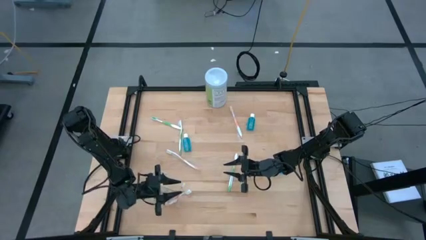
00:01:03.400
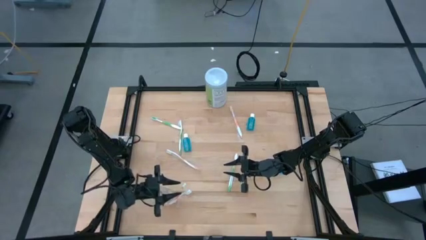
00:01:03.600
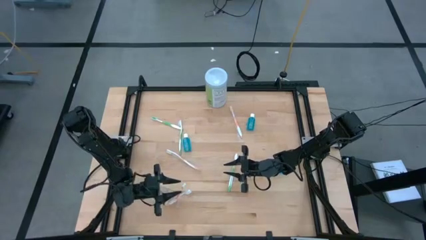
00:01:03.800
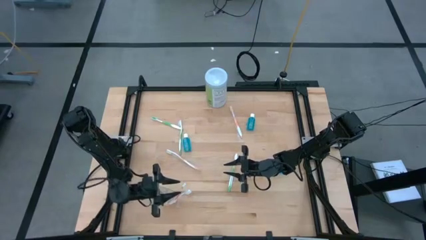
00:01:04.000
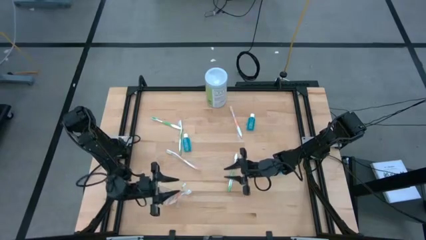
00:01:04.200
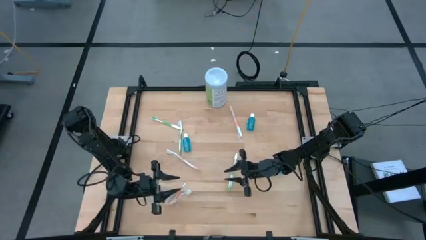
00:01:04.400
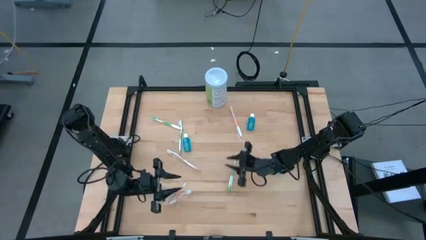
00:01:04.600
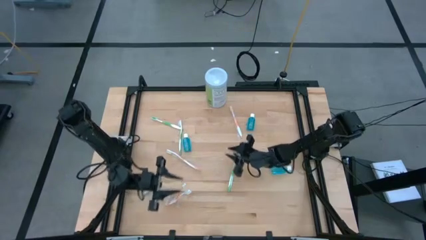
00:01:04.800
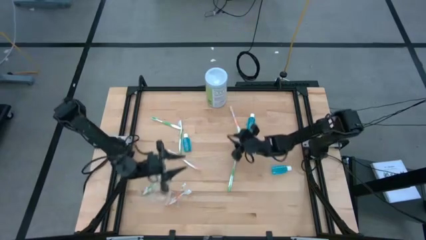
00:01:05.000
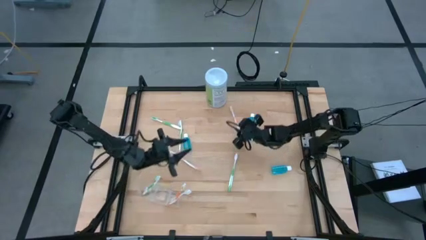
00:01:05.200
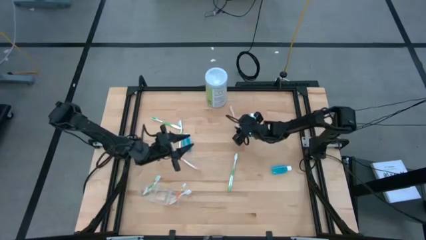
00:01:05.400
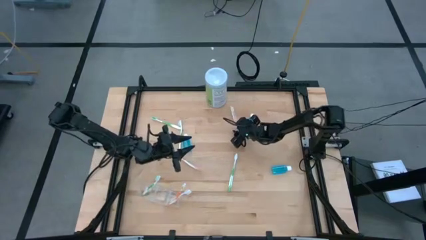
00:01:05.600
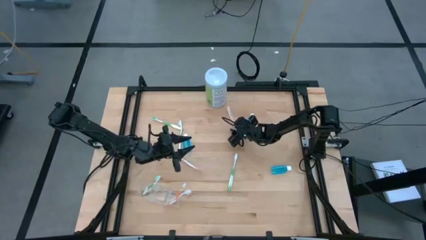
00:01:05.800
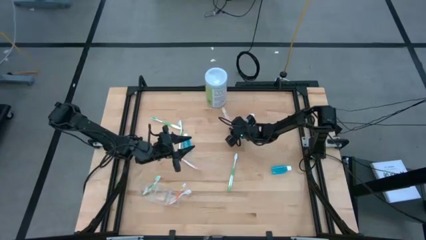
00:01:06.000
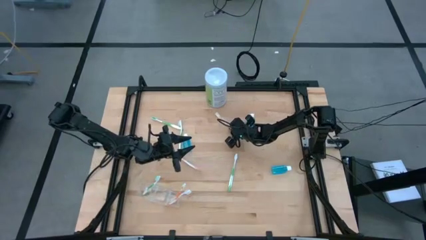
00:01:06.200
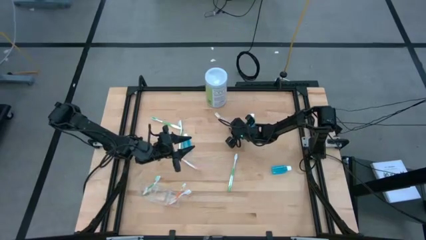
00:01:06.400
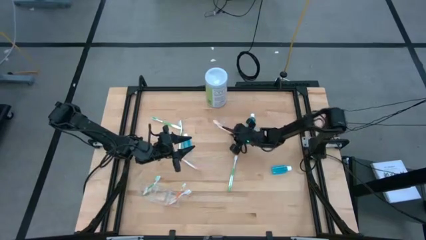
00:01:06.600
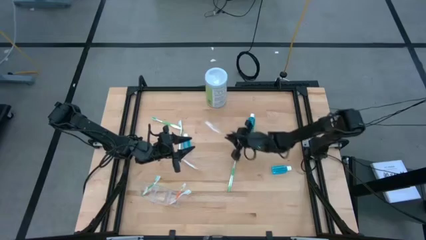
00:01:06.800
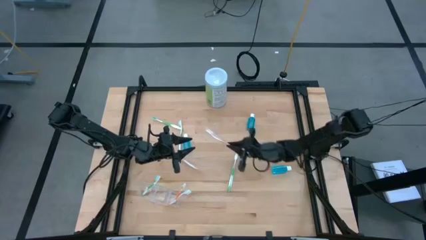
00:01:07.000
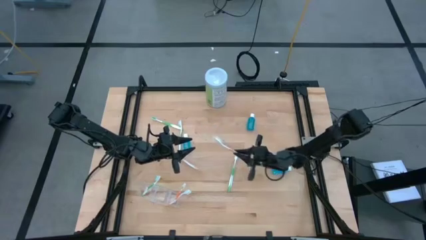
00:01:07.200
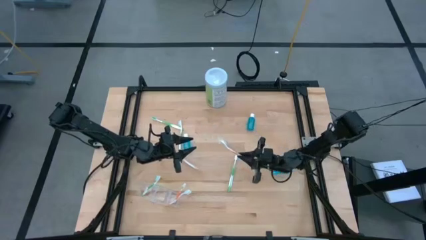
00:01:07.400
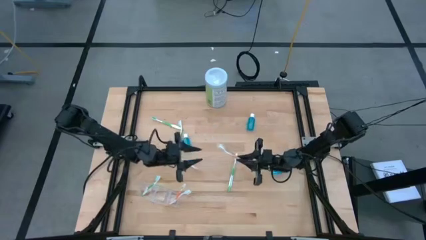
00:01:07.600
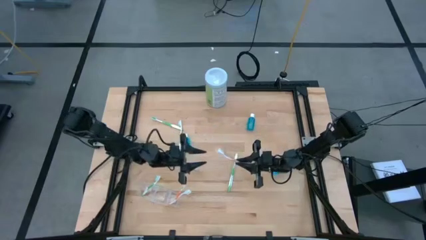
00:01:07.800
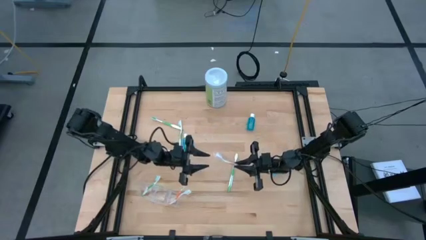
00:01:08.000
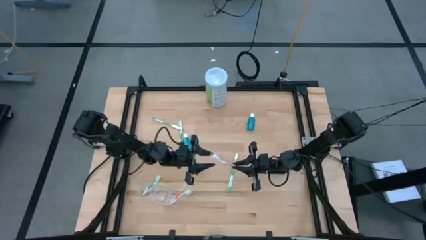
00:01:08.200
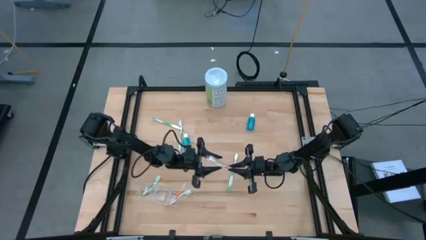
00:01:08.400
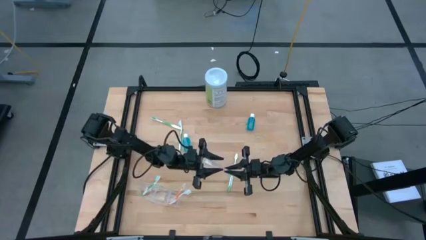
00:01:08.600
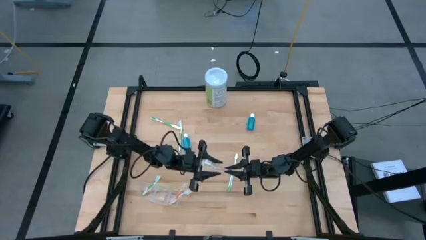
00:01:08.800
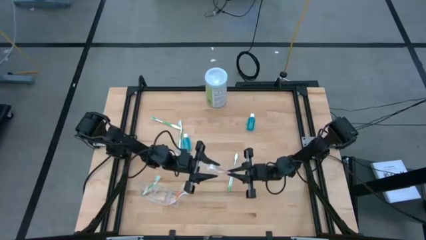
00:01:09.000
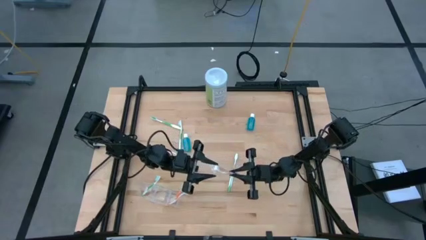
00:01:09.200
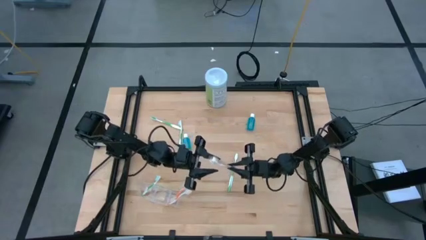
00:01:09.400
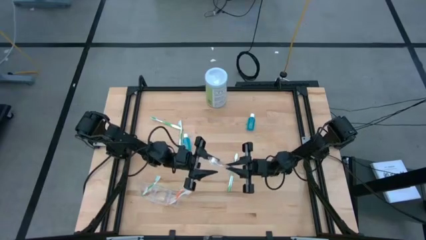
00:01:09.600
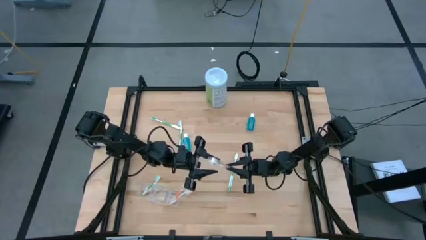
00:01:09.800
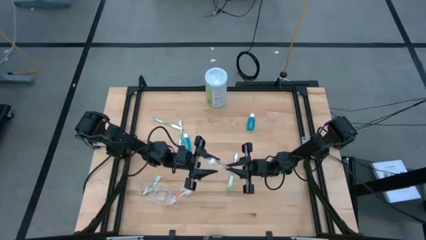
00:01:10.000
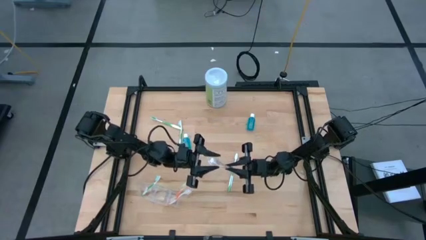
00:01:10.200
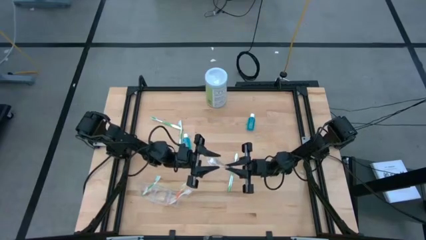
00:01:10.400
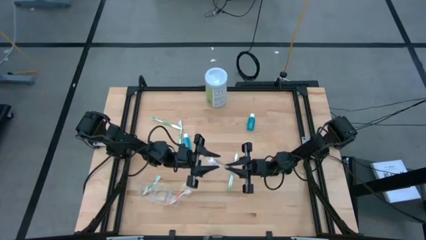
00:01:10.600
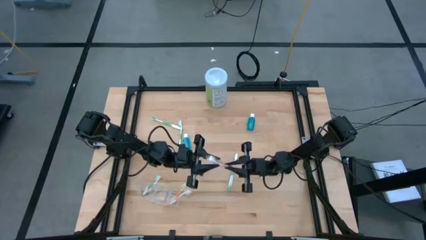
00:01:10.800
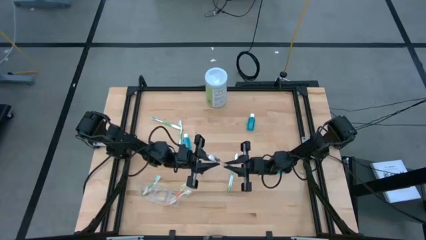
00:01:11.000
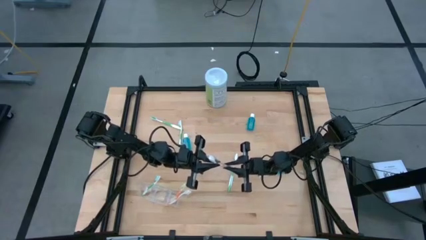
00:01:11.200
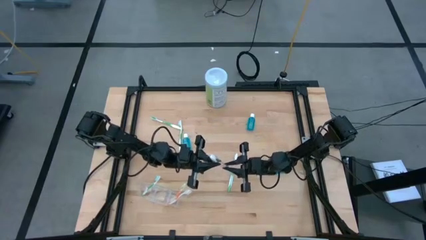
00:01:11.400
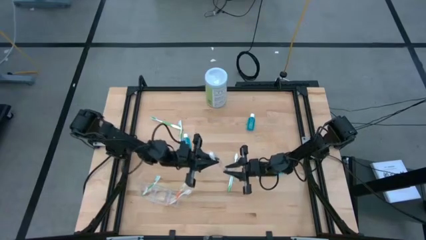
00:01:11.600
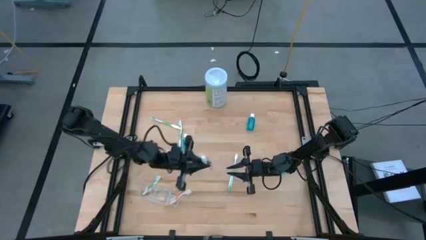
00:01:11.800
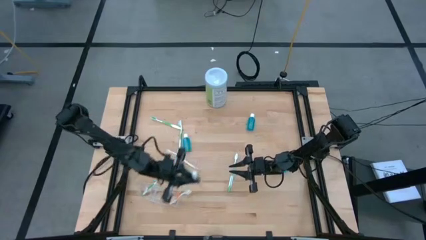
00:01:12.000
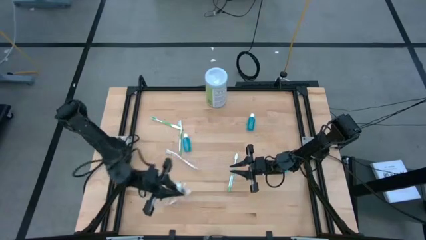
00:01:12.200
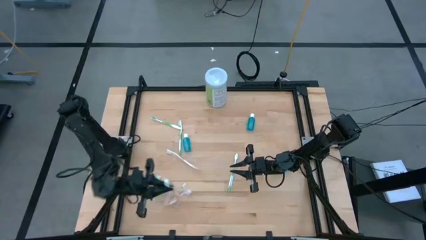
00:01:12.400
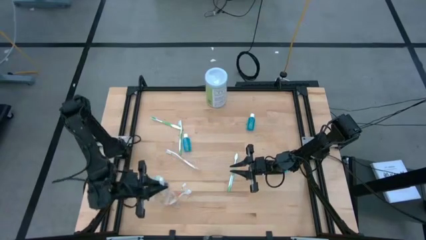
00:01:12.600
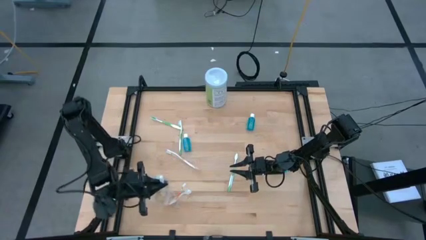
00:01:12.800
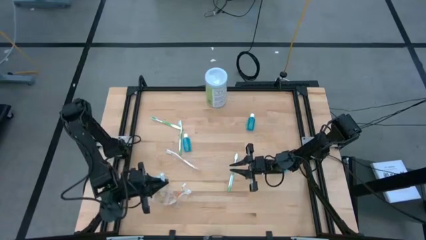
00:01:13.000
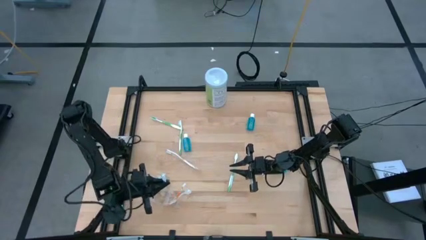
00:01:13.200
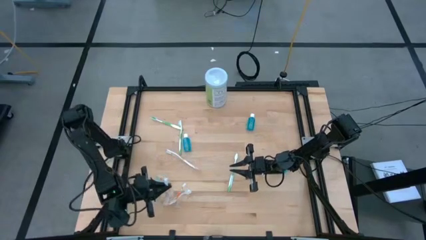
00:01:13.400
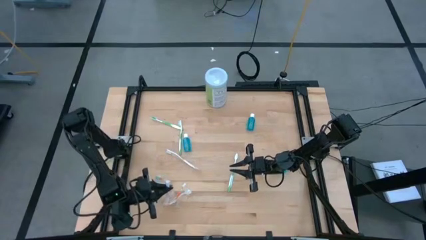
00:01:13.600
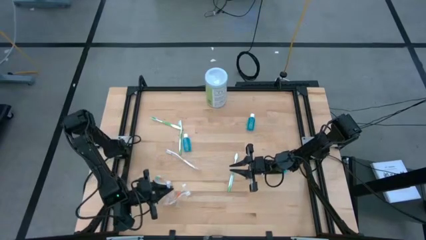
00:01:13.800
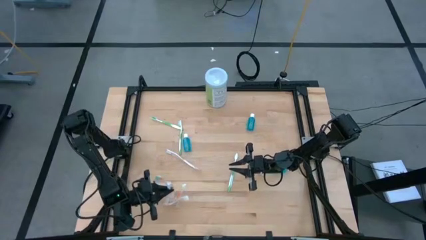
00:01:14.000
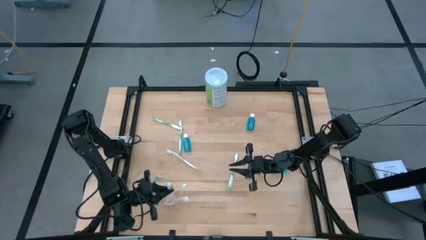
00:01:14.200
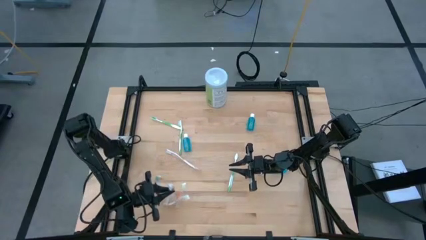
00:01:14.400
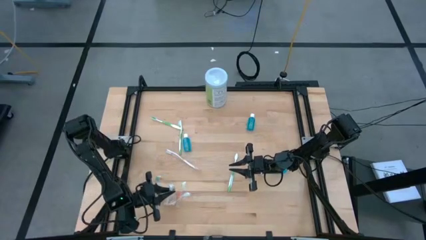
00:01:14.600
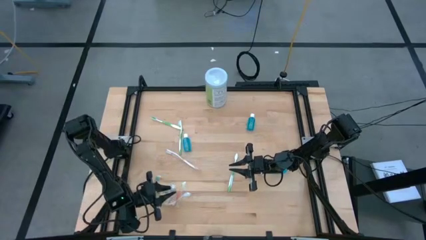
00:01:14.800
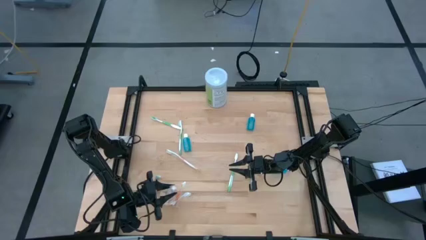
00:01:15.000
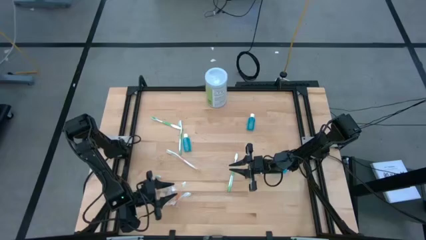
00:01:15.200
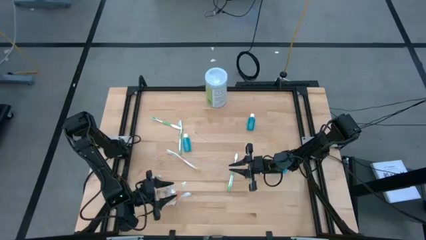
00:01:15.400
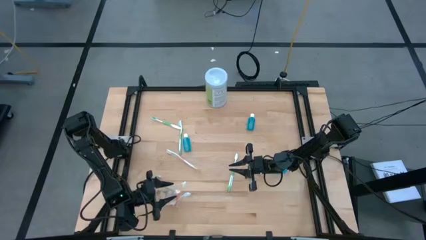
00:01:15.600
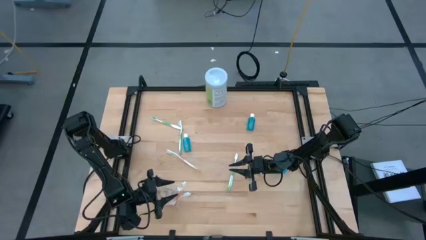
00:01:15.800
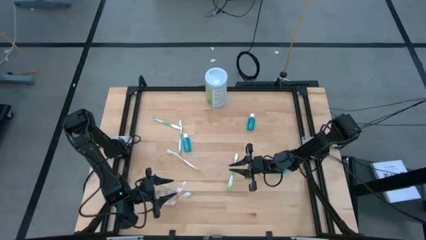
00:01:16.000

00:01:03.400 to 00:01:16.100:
Task: Pick & Place toothbrushing station
Put the orange toothbrush into the transparent organizer
